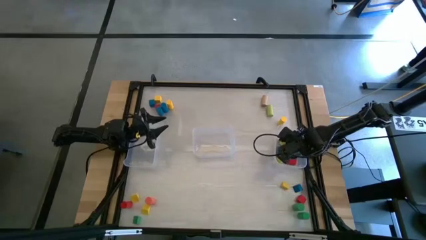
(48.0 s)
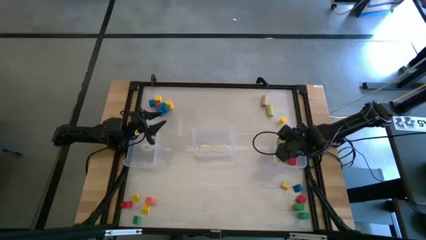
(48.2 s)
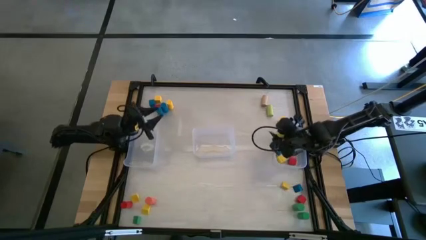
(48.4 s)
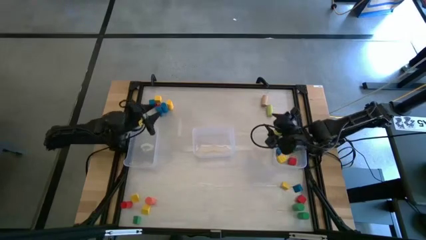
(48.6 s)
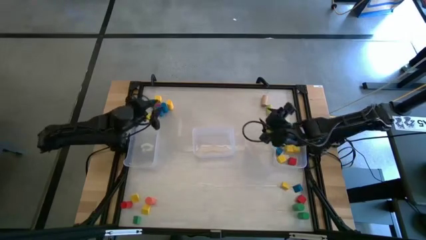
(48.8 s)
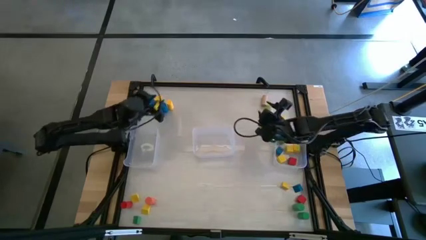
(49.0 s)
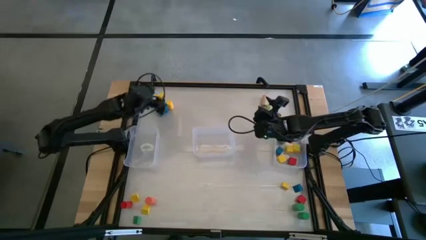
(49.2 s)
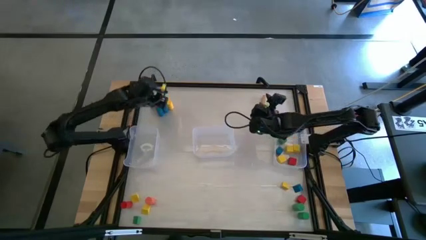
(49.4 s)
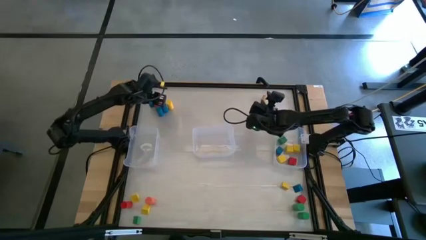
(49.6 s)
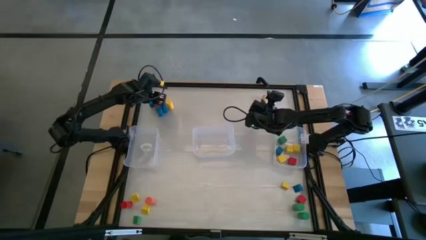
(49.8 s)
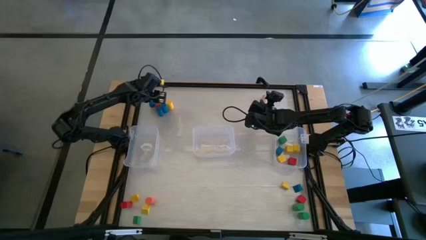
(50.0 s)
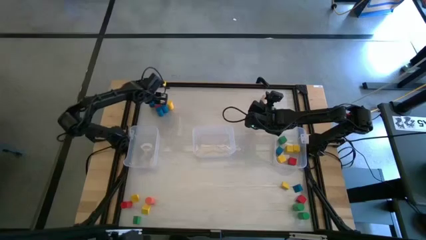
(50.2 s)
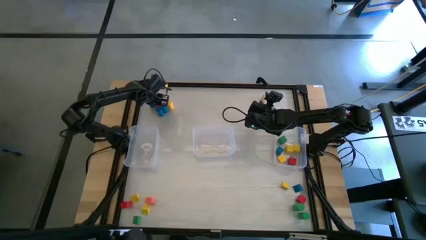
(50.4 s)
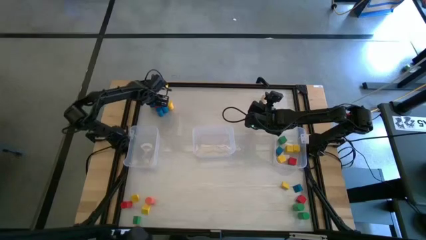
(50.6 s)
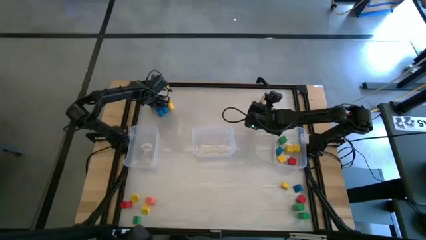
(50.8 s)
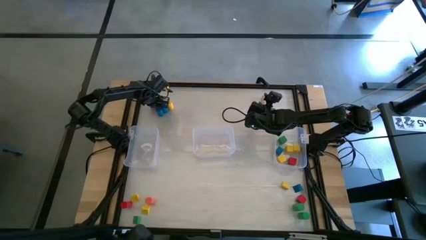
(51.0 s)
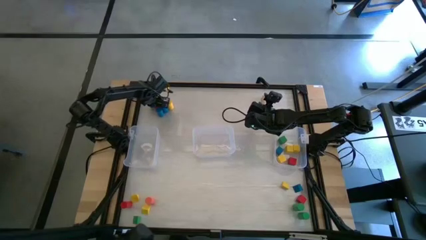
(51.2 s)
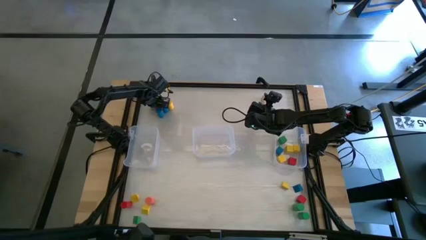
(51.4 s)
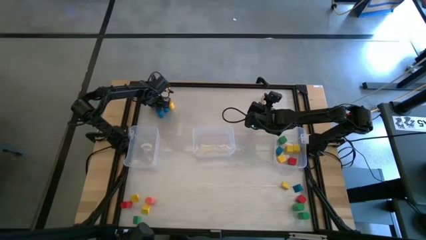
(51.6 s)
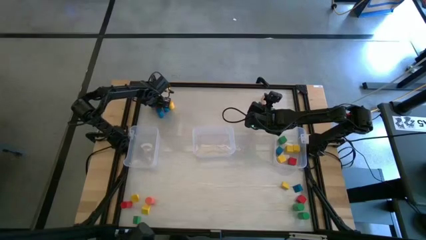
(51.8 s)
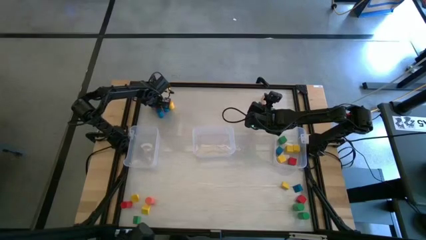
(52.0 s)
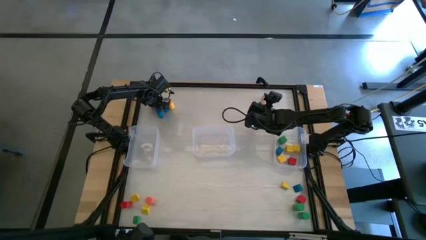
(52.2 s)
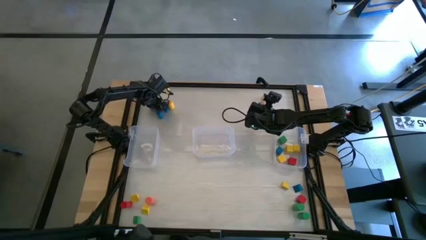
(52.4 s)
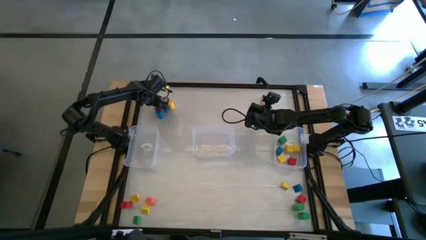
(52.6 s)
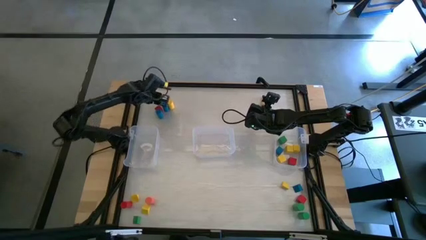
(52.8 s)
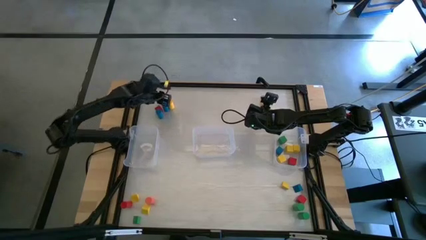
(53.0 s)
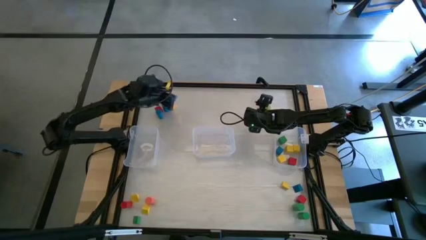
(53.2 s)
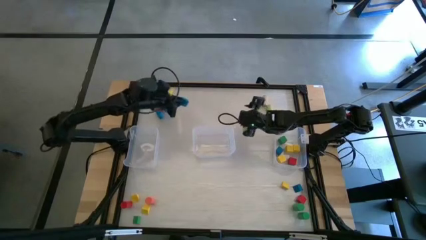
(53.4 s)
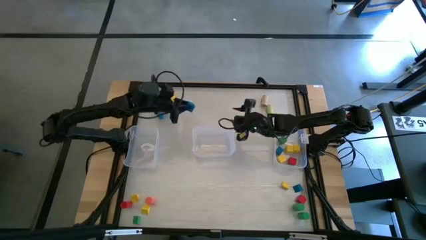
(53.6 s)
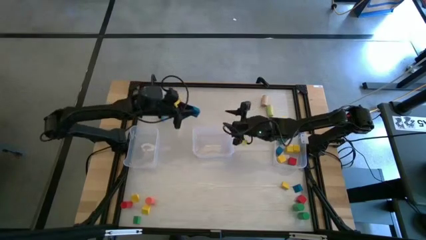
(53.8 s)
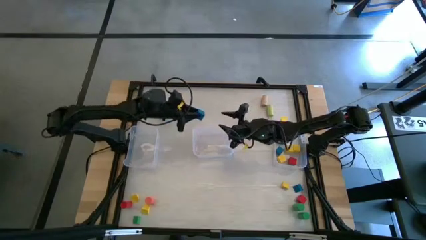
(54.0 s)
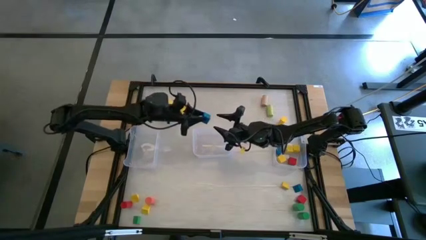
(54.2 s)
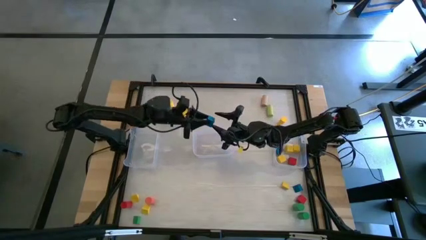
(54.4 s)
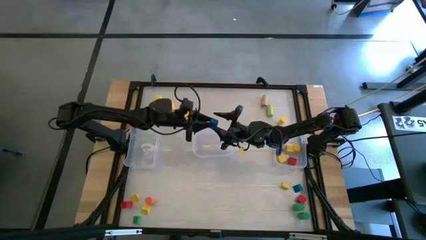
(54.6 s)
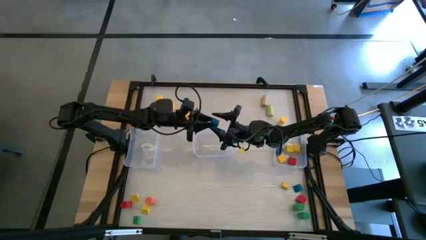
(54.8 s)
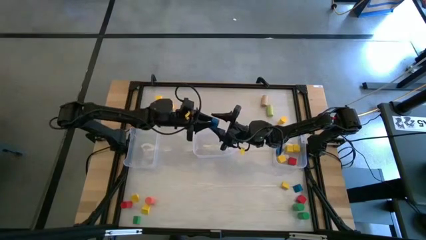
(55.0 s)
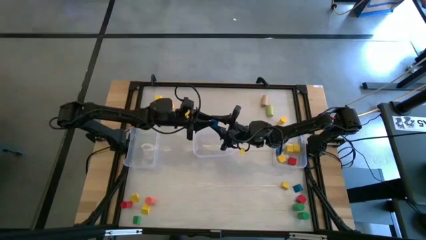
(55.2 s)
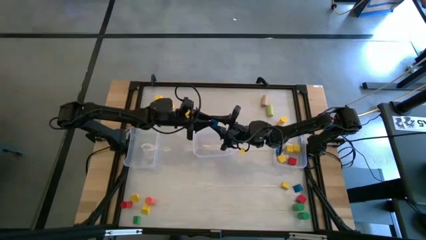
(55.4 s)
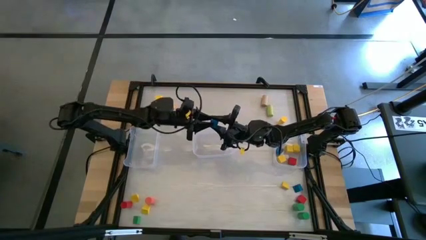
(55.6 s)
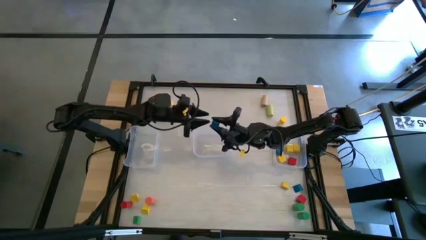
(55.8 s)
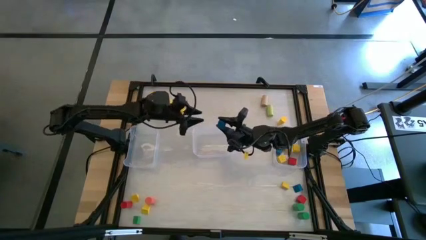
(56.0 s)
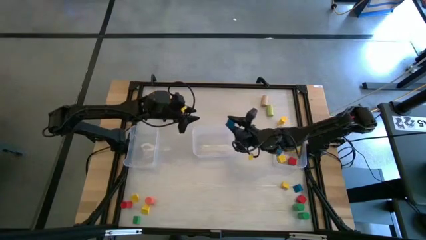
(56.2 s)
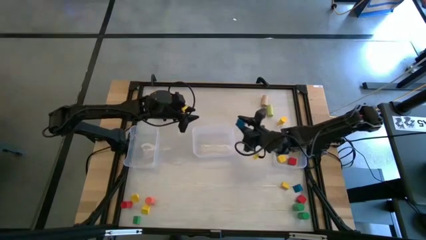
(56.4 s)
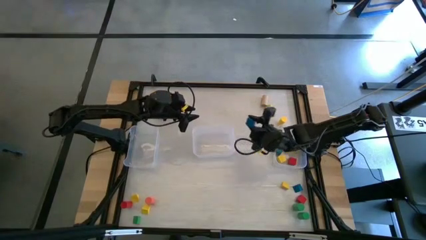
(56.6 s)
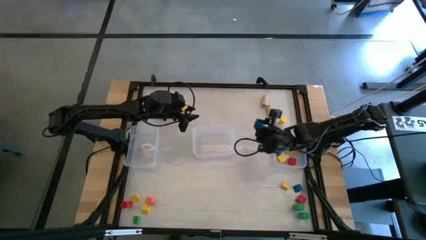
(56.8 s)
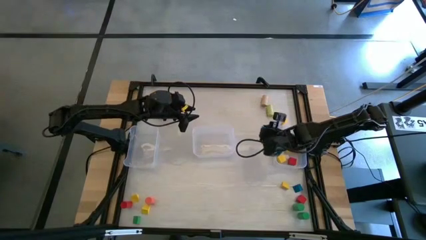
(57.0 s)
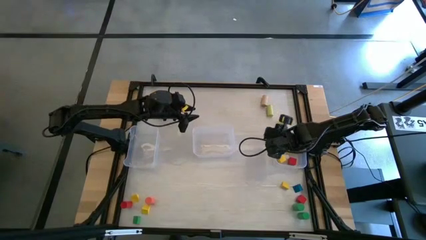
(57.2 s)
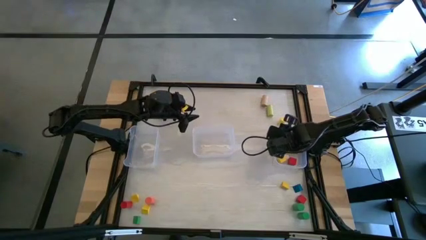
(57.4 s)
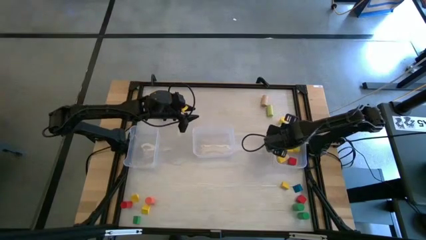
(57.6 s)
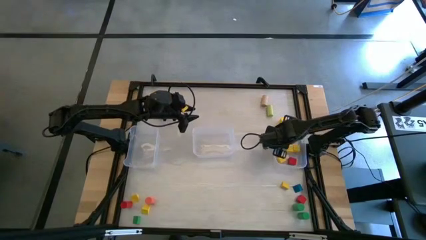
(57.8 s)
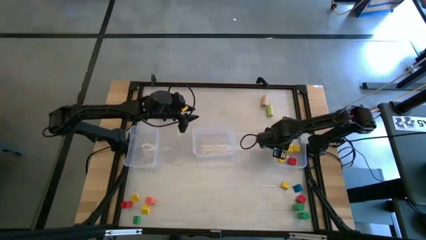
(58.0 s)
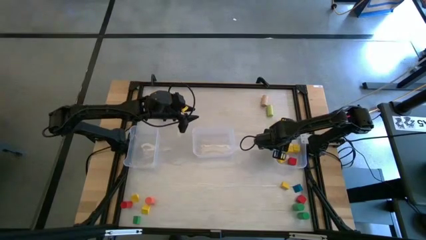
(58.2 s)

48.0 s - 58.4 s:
Task: Sort blocks by size
Put the blue cube block into the right transparent bin

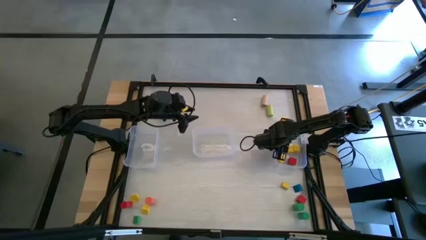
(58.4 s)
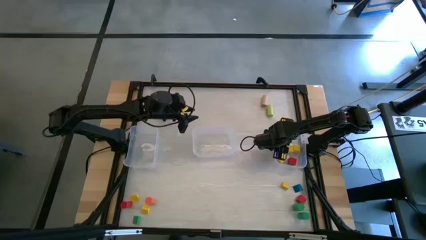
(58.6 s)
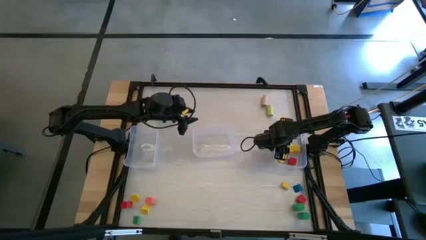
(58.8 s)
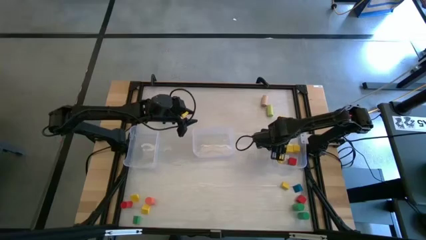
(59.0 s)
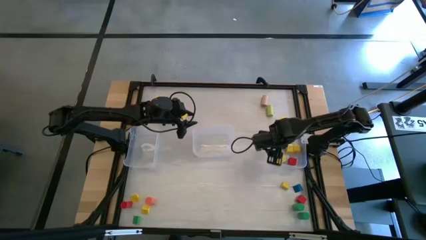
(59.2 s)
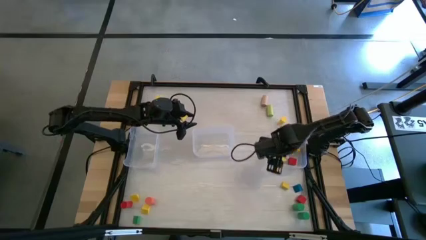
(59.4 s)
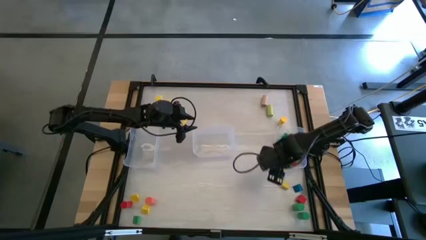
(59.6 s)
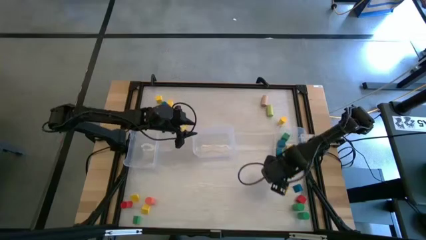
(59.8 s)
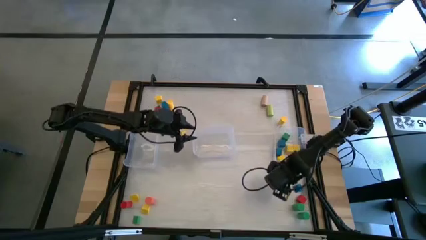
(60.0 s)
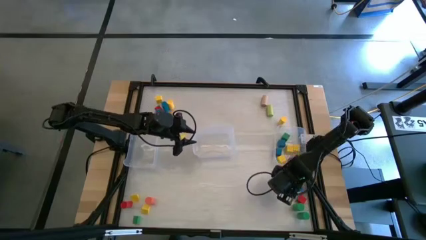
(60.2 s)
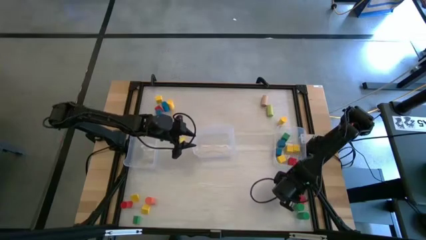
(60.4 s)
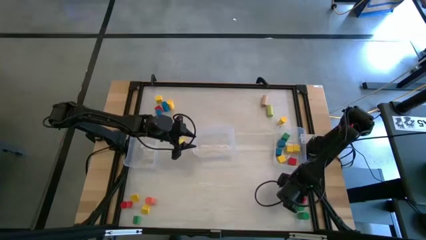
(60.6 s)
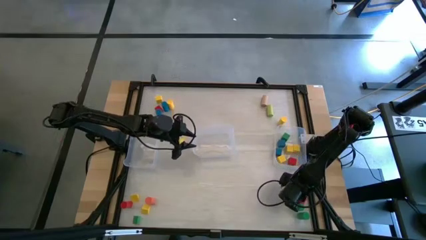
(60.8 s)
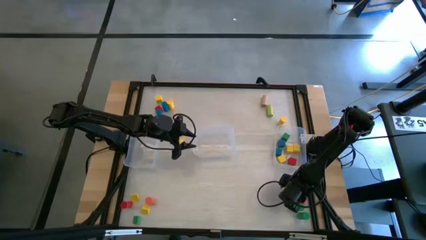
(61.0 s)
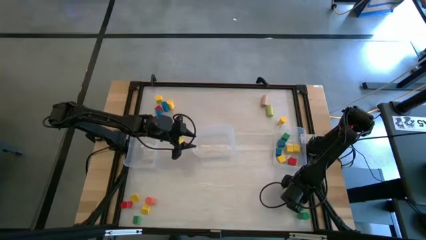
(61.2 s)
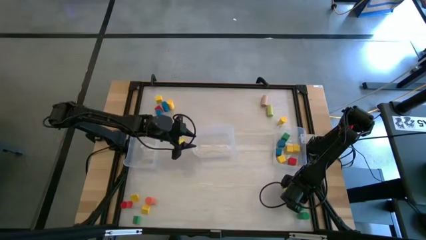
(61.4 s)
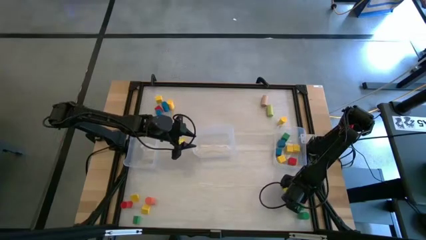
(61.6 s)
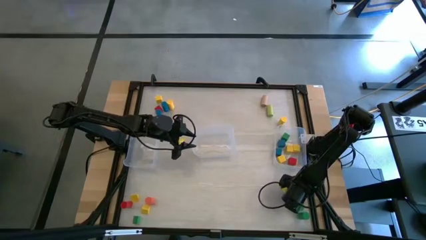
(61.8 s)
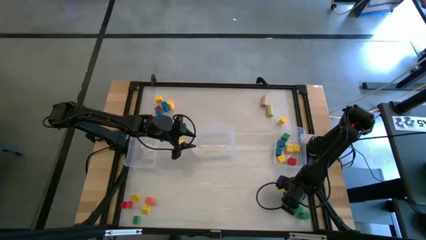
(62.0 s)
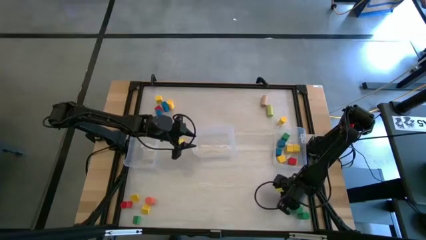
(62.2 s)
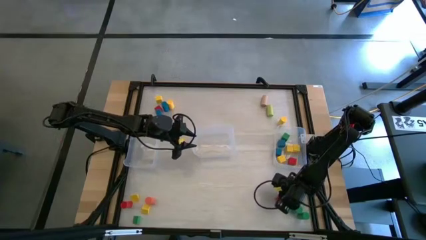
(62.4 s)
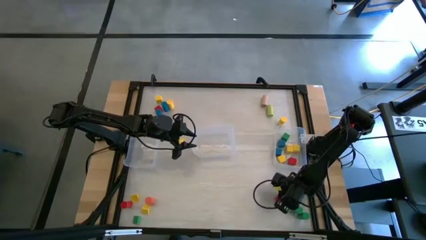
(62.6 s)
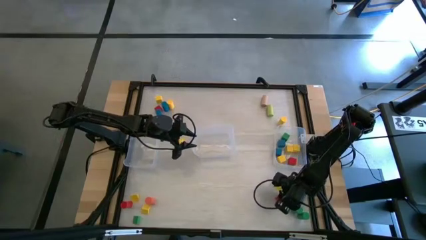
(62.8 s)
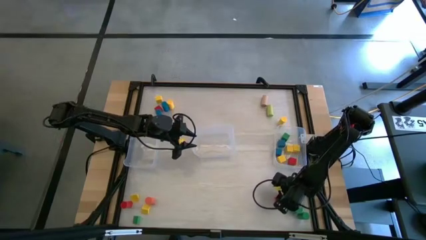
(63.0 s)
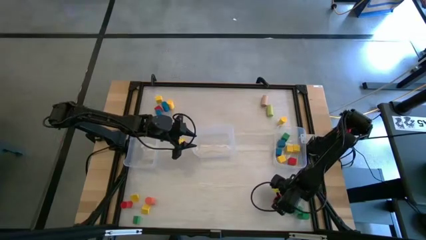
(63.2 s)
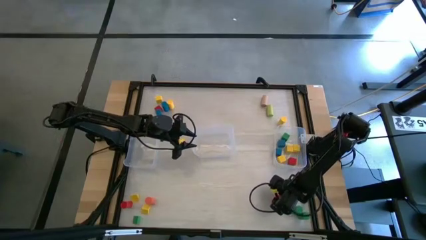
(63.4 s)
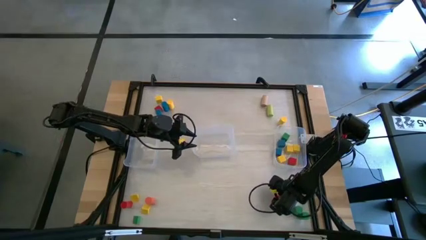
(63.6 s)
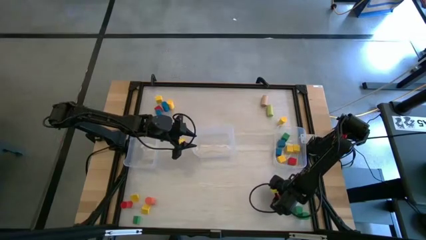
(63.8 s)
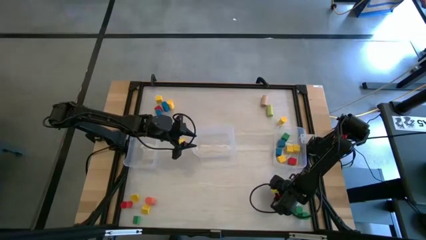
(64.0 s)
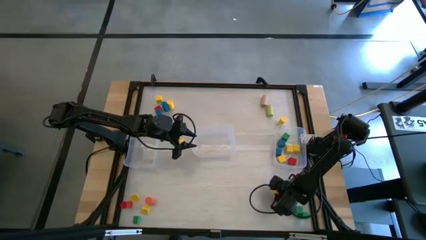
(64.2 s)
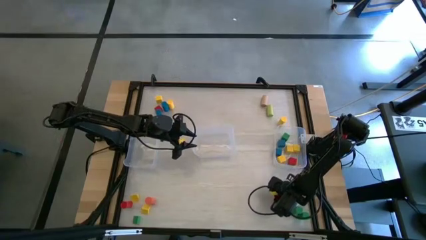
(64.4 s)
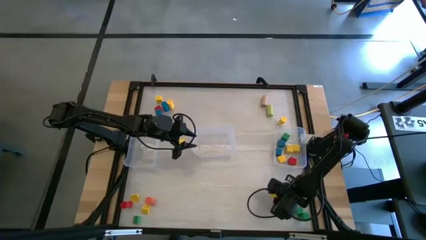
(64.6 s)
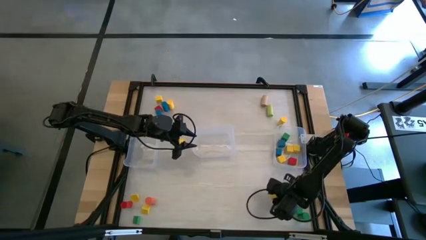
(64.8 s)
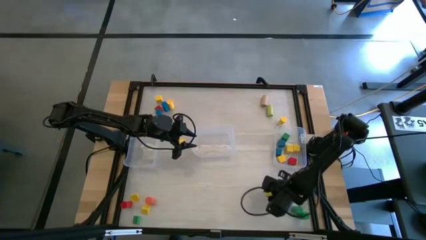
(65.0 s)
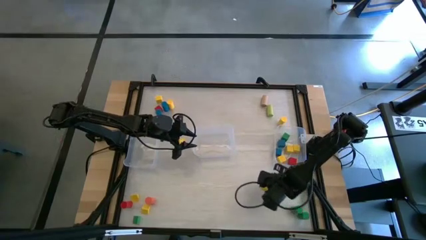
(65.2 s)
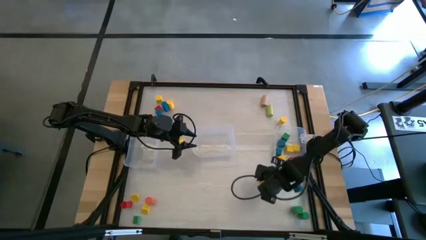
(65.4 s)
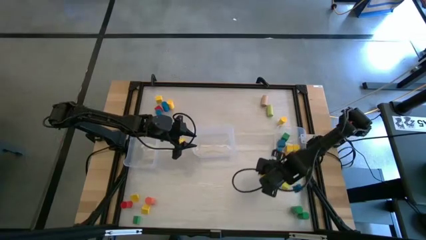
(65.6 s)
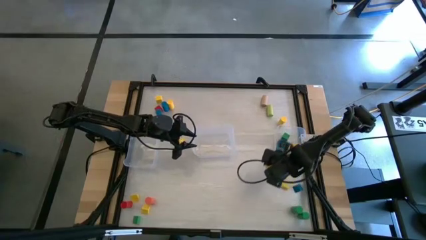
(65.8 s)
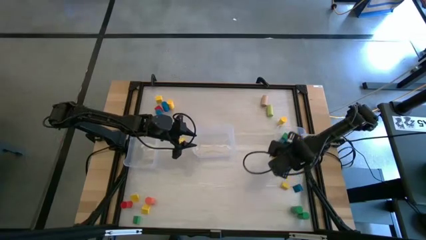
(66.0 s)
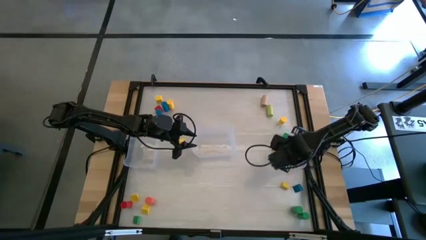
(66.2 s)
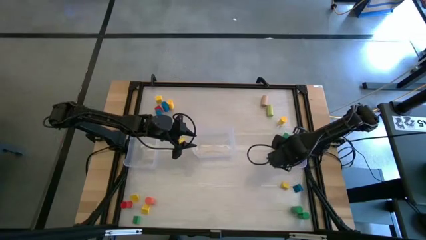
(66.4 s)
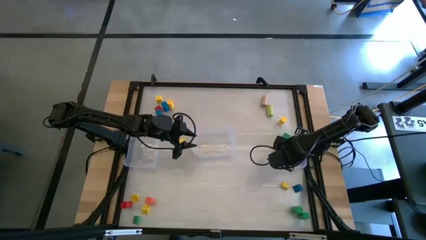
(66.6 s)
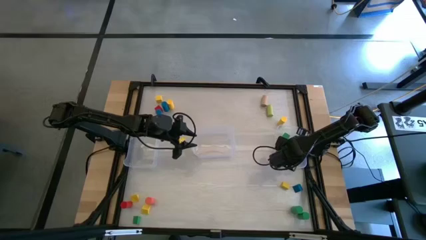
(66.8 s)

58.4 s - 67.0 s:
Put the red cube block into the right transparent bin
